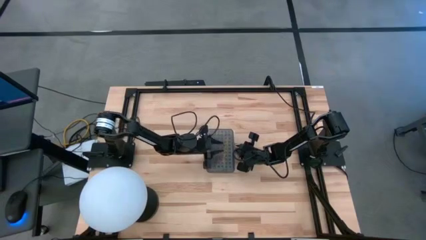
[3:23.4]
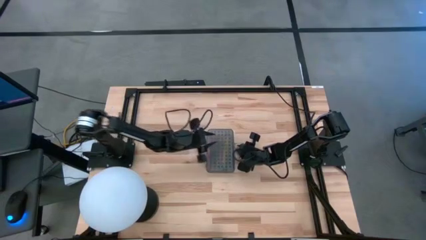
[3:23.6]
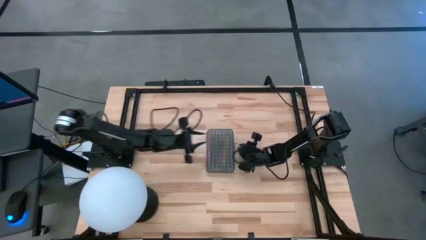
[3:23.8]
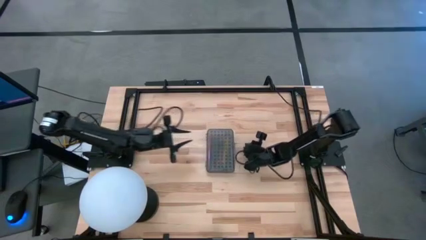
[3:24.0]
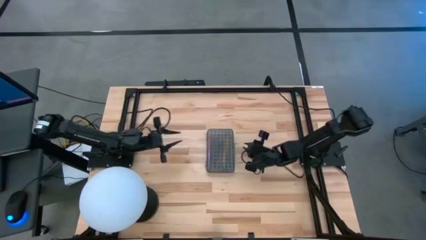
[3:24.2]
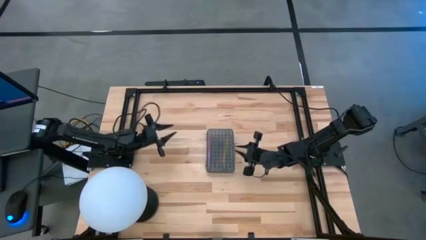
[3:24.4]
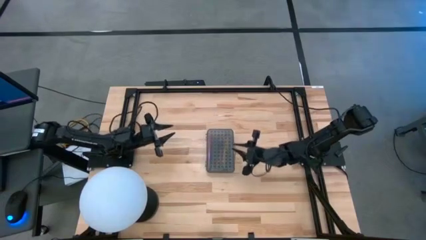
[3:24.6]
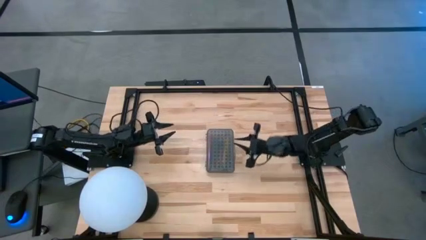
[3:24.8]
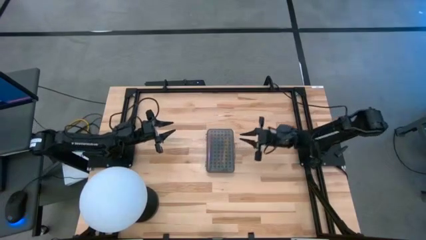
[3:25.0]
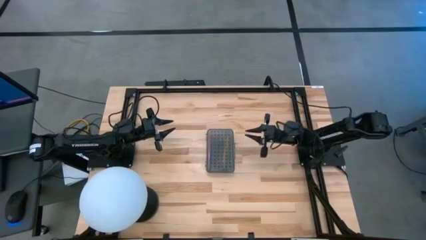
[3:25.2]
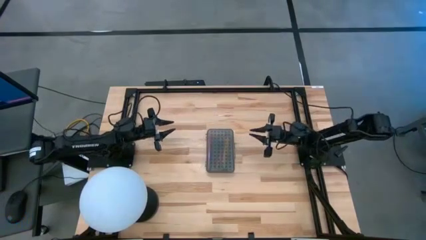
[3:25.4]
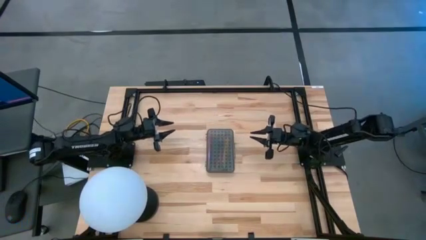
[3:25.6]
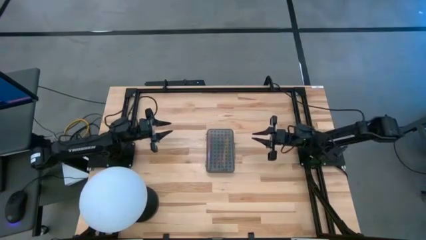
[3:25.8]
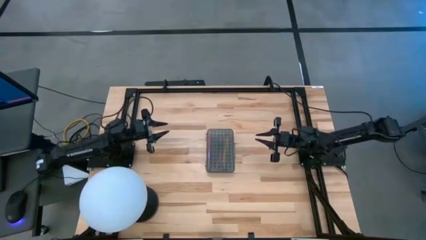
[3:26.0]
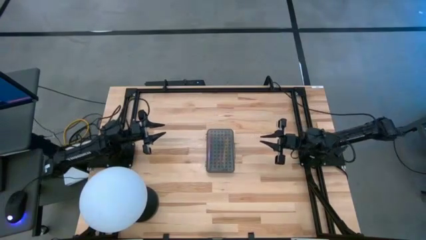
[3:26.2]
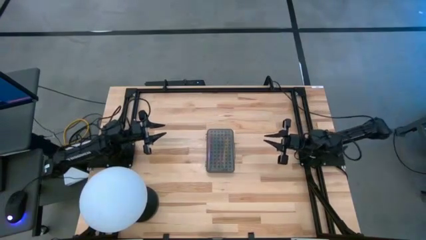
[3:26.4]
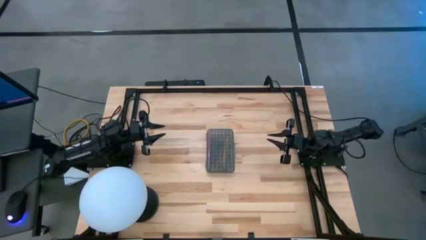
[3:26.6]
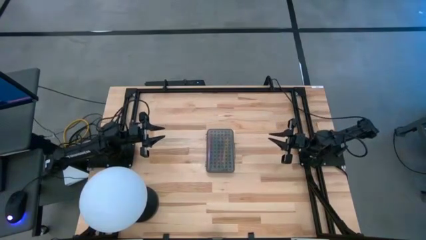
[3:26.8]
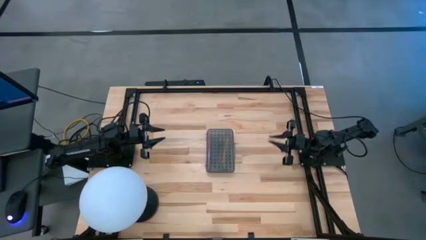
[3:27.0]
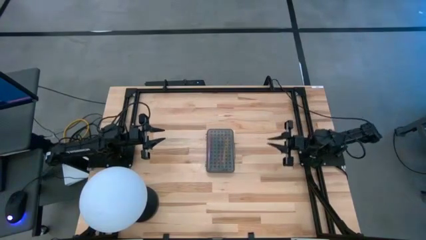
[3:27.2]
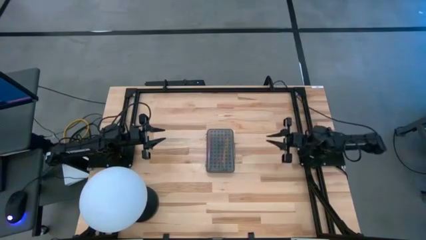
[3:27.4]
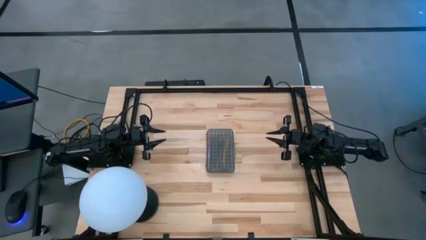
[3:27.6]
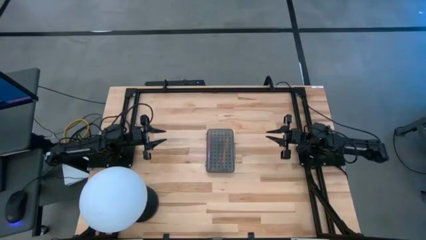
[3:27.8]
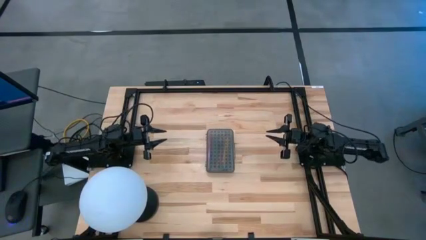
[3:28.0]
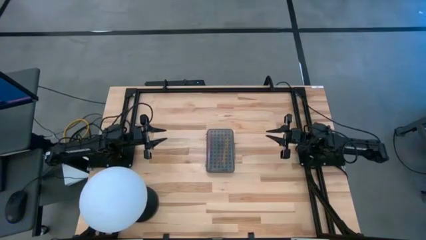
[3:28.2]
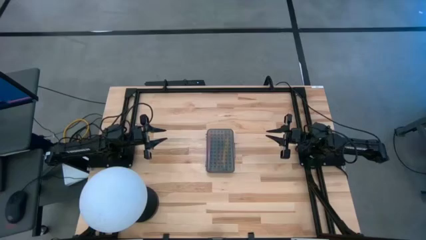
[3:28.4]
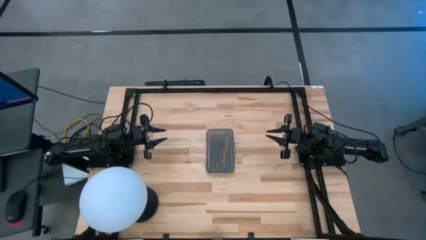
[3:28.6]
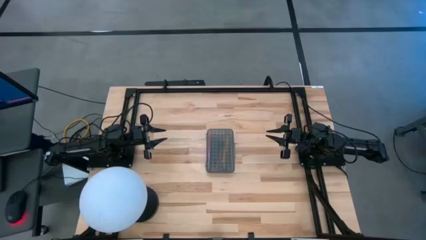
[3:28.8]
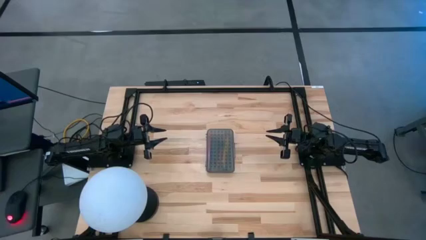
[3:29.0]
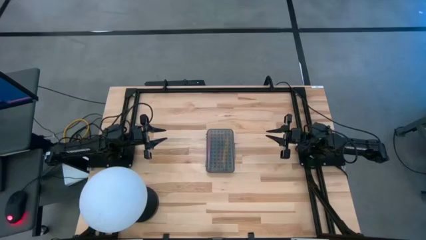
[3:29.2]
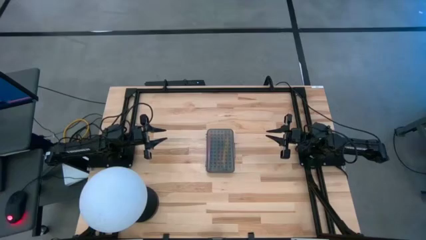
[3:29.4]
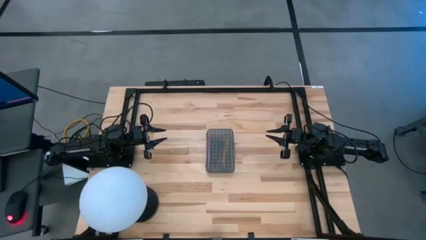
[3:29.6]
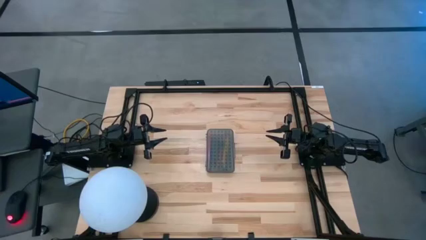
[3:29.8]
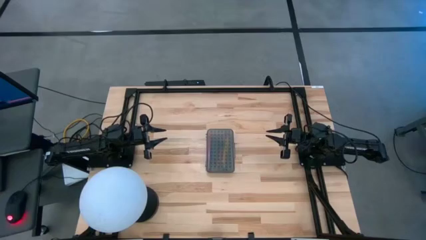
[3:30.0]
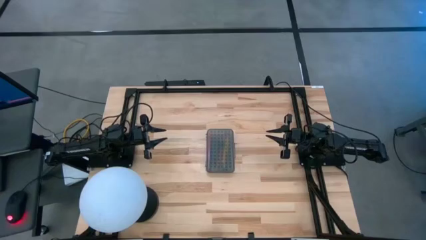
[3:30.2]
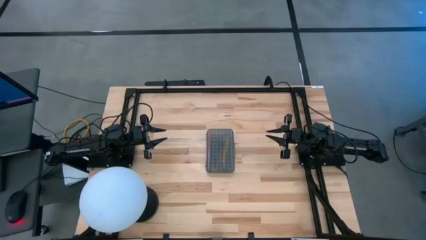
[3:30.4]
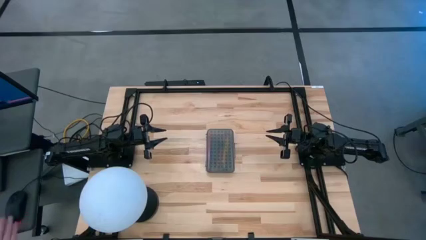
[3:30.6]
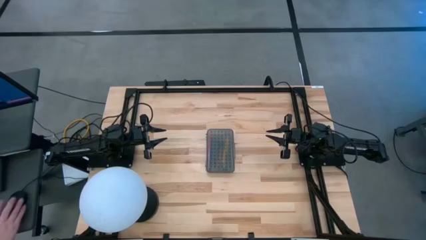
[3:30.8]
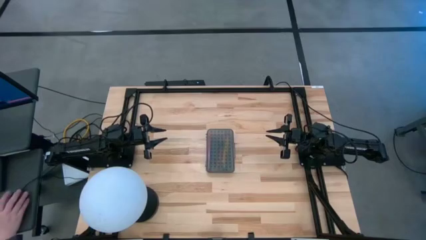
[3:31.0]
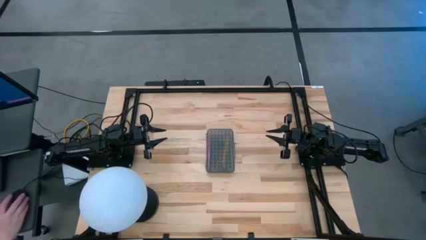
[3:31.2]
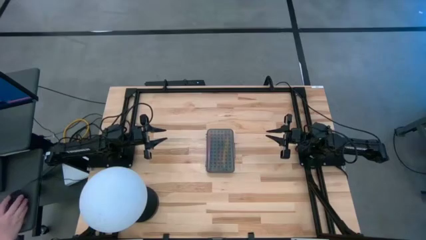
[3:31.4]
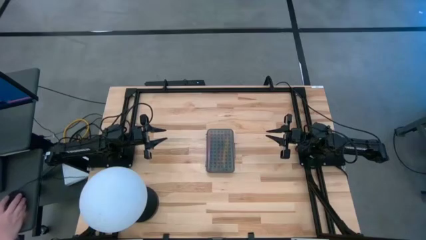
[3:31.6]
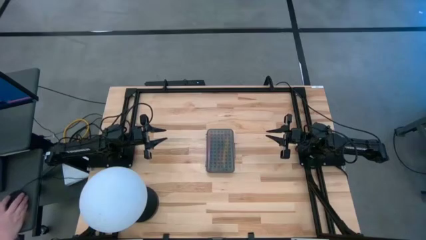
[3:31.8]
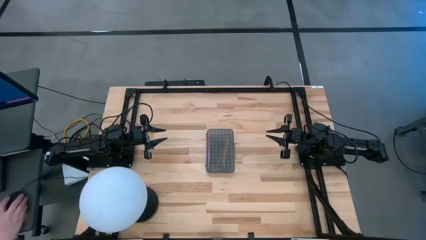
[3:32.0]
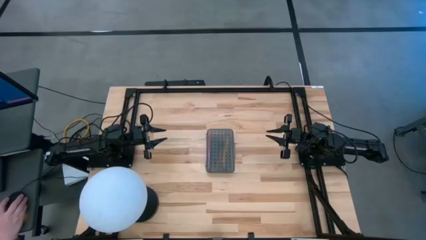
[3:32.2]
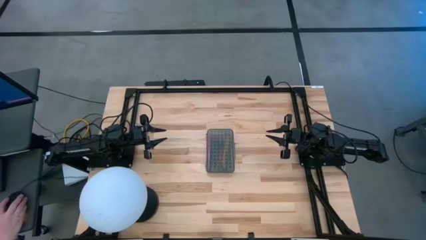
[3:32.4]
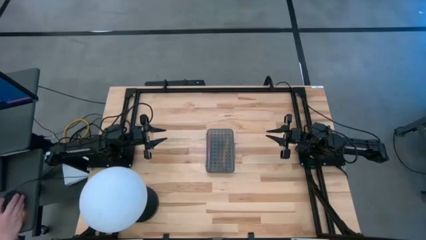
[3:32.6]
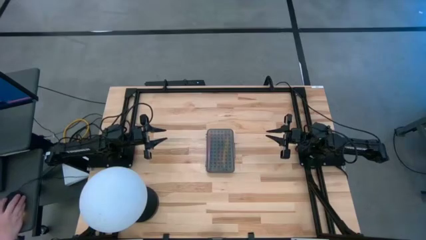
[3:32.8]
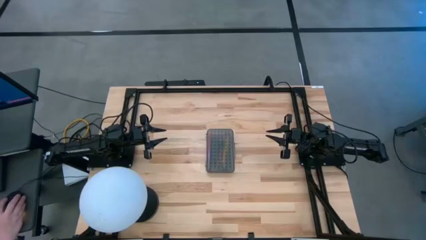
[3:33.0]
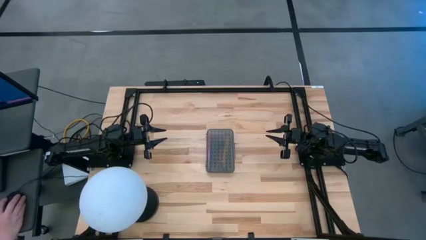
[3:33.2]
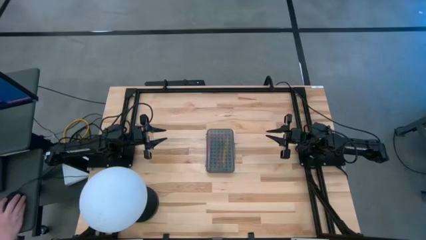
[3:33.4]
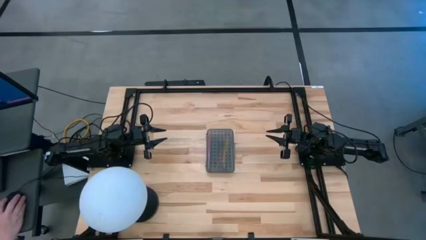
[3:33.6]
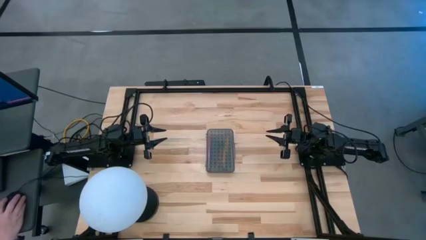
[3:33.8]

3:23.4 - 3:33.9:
Task: Pick & place school supplies into a supply box
Return to Home Position

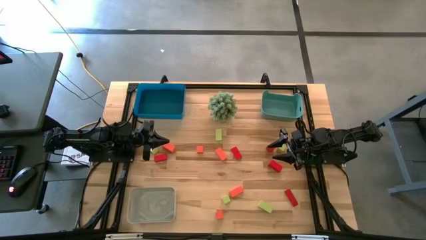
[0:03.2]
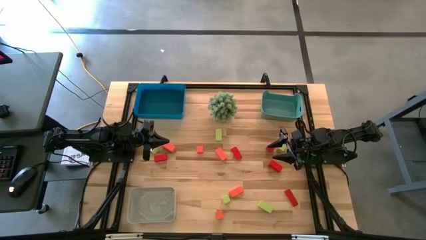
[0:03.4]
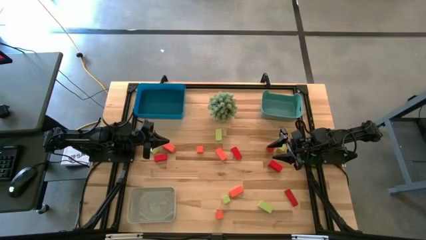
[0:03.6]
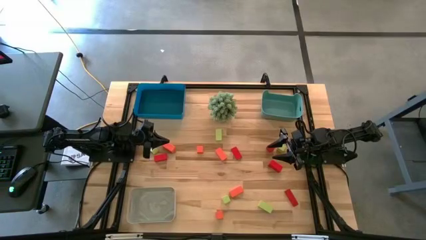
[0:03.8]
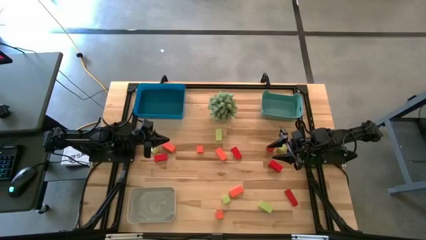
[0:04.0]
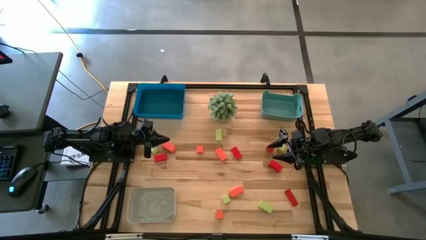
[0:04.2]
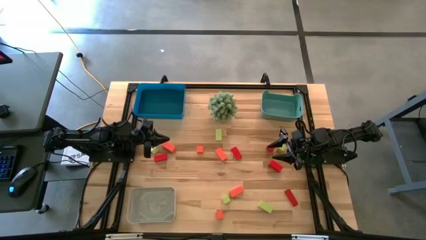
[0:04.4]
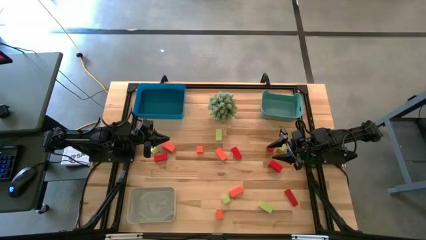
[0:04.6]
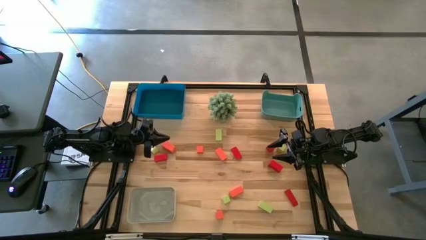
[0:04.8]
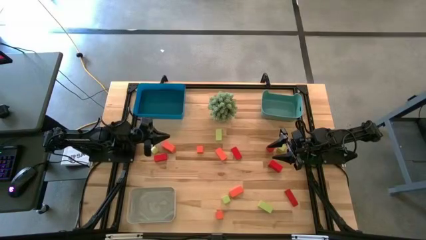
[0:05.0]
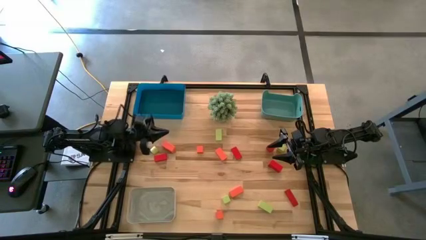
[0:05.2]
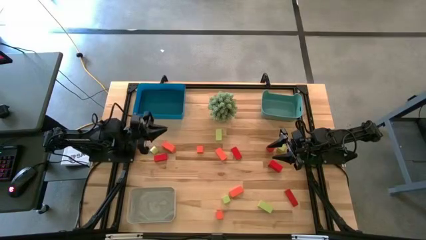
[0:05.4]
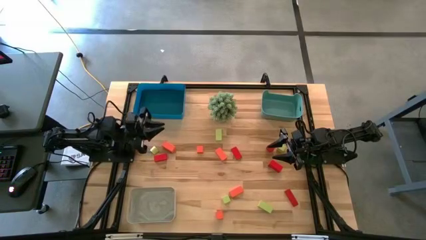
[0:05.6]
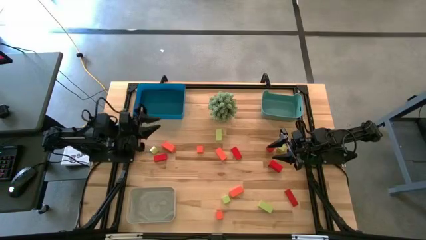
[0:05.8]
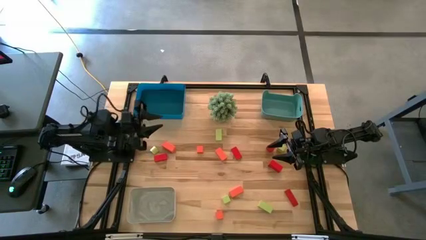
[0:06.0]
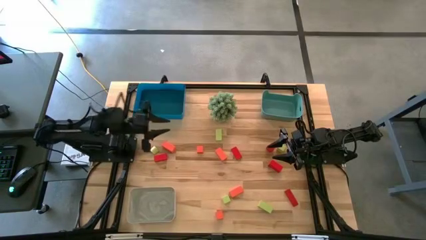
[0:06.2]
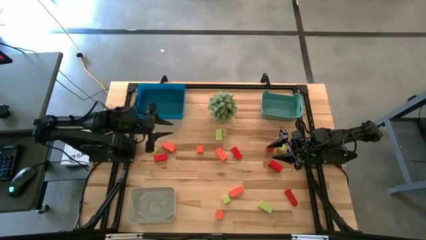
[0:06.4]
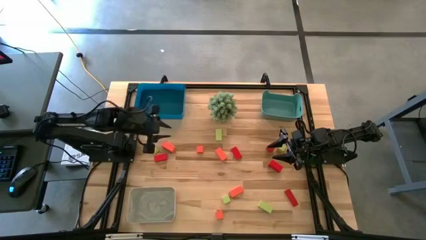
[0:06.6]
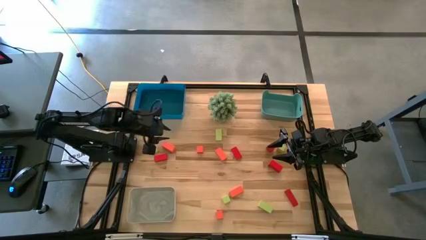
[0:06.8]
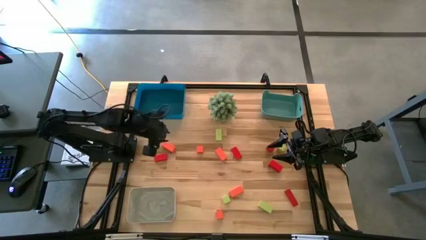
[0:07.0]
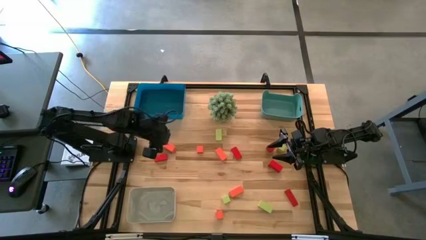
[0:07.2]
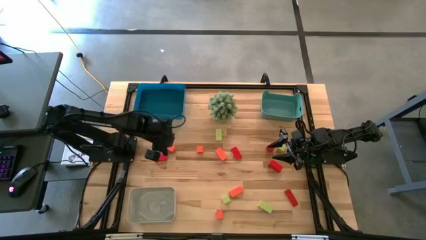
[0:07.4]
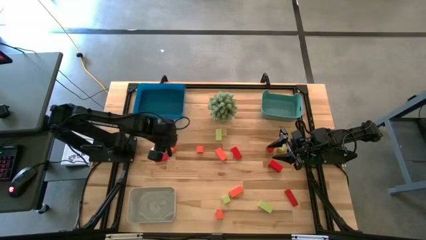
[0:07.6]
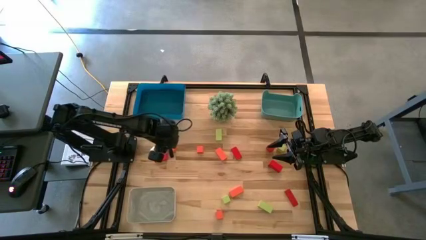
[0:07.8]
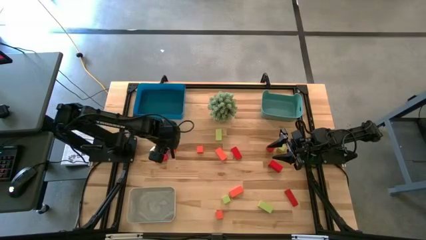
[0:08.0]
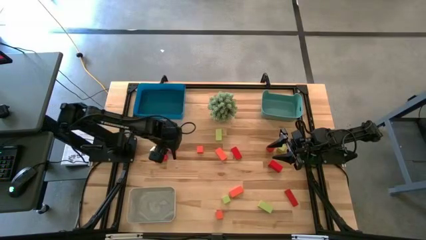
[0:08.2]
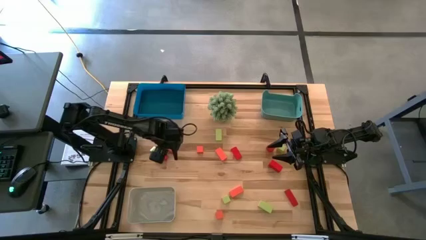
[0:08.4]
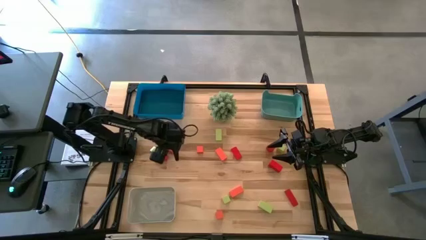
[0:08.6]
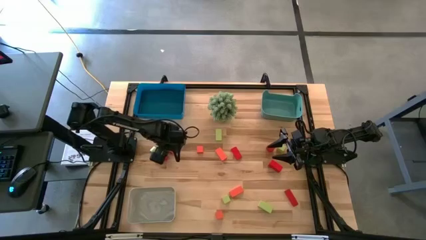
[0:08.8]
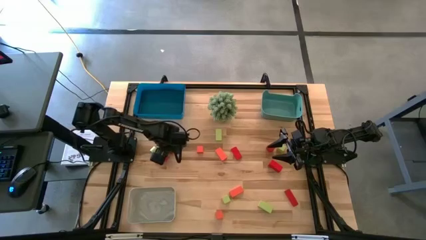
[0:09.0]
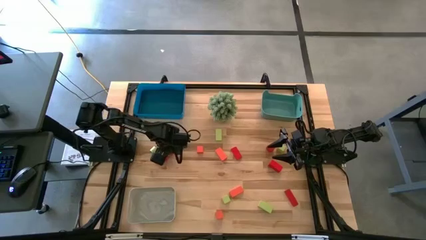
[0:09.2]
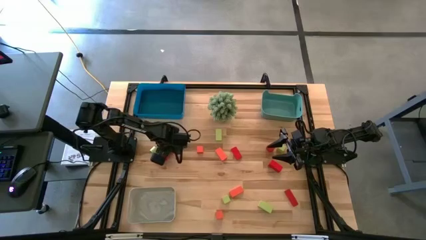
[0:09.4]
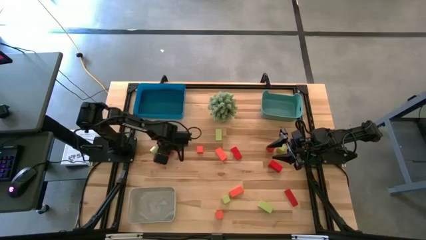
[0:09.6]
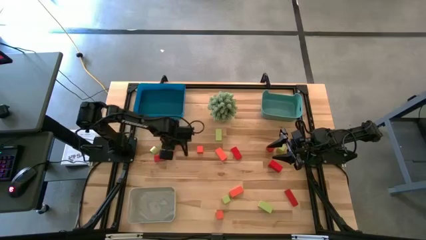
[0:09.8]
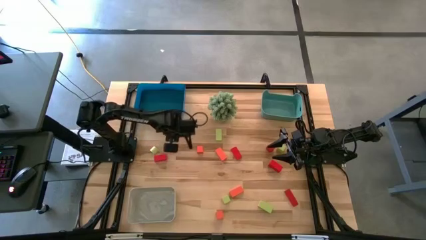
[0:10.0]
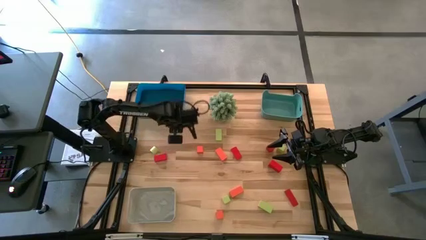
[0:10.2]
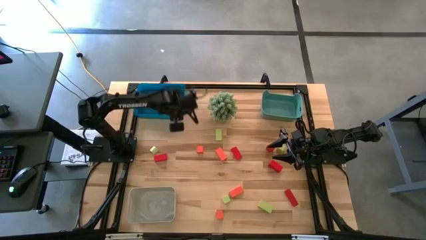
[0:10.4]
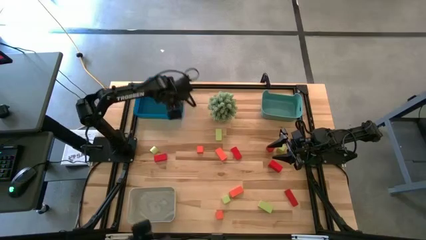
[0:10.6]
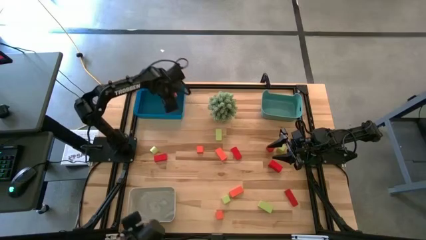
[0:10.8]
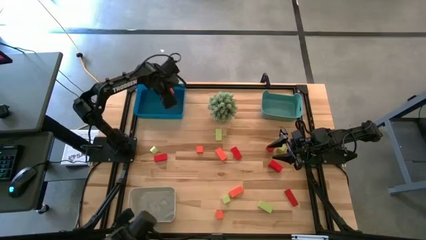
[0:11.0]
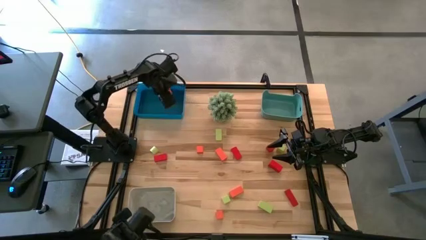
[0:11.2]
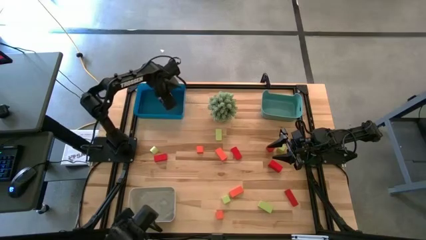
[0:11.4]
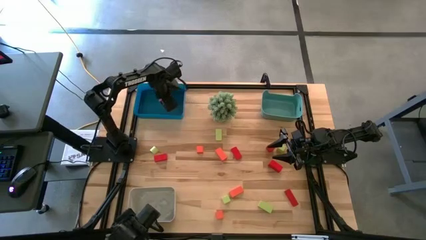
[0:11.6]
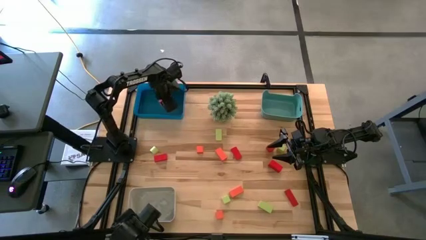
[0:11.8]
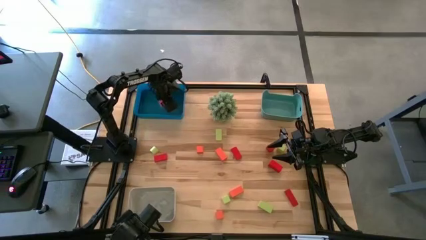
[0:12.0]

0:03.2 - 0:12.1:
Task: Sort & place blocks by color
Put the orange block into the blue bin
